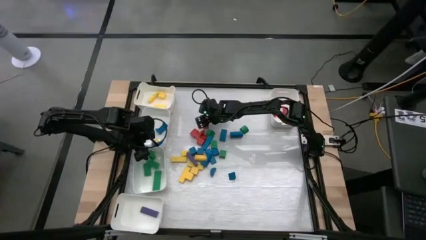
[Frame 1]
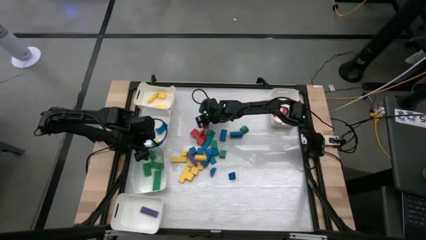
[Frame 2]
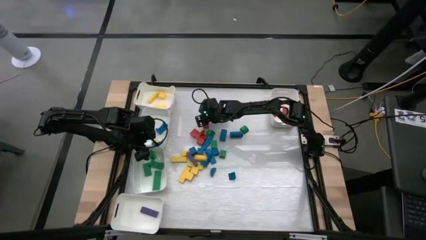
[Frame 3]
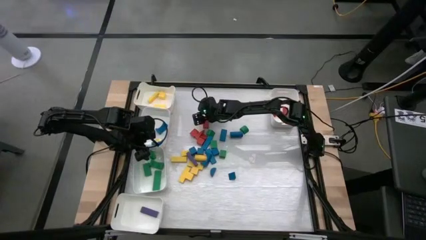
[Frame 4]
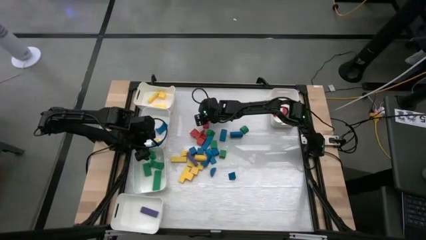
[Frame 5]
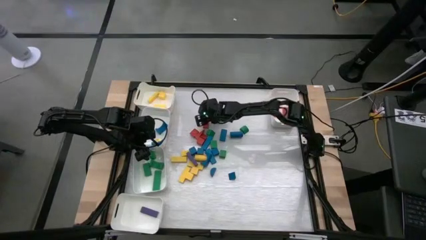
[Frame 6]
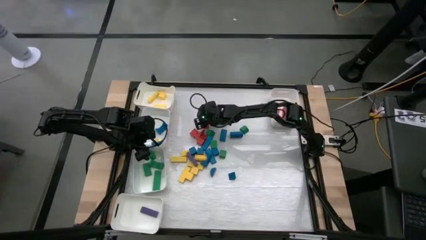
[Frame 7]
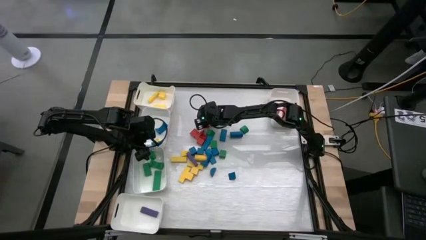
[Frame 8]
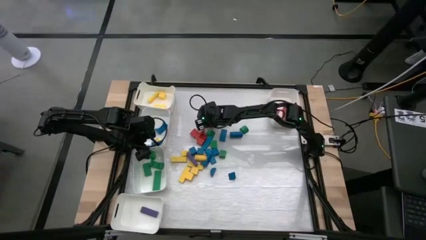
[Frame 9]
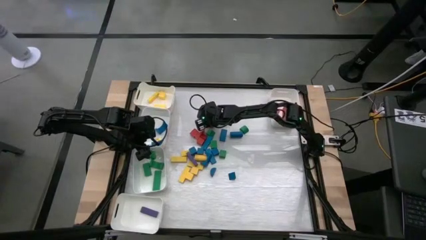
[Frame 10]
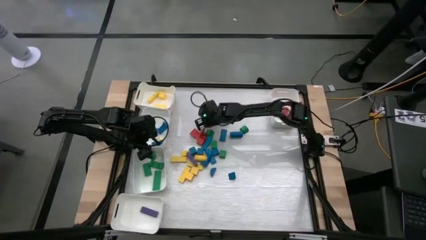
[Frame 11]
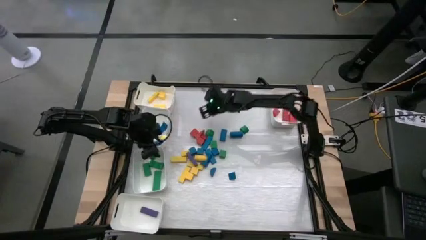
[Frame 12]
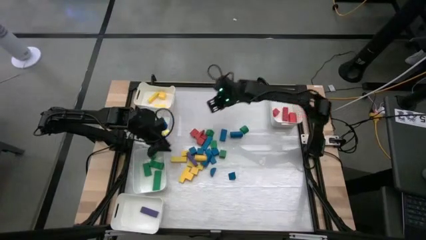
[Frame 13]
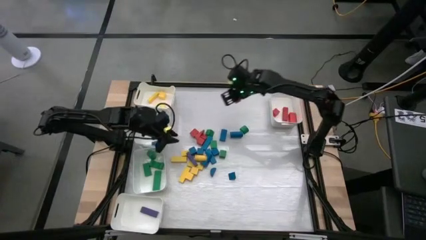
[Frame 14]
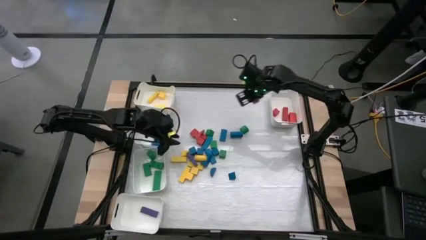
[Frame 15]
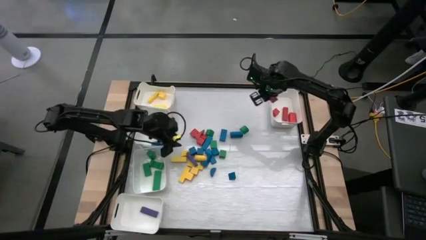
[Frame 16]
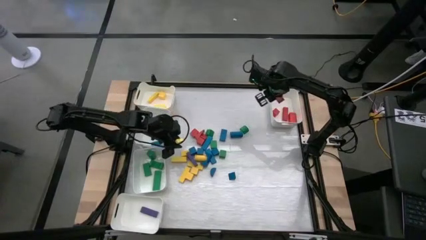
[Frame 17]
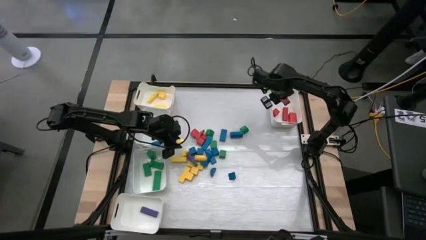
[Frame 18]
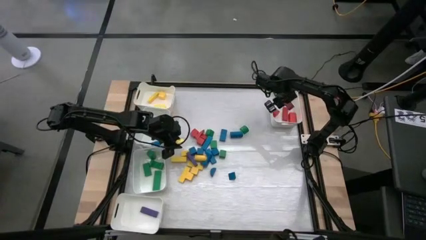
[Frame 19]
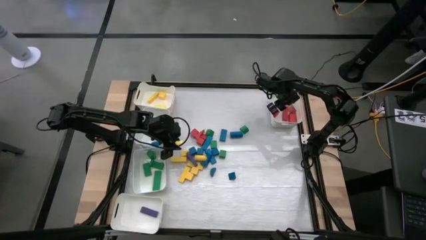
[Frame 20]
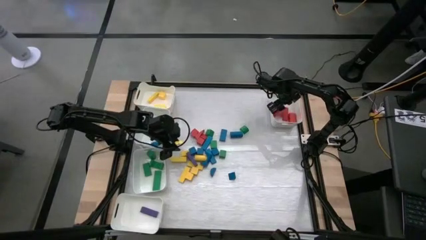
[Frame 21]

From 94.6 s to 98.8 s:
Task: Sort blocks
Put the red wooden block into the top right white bin

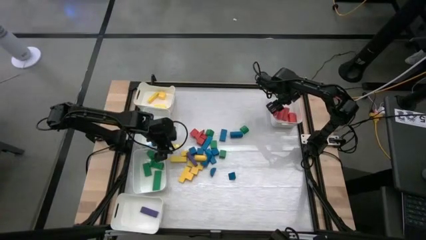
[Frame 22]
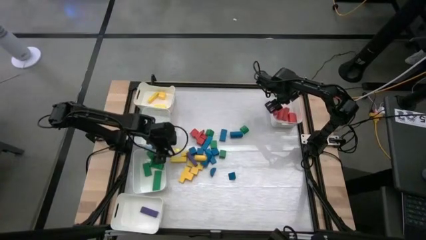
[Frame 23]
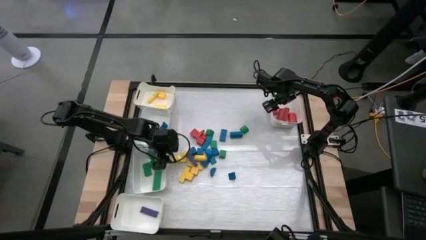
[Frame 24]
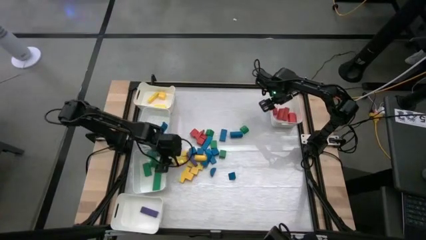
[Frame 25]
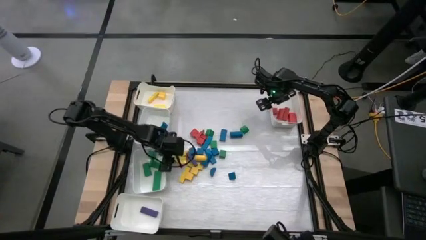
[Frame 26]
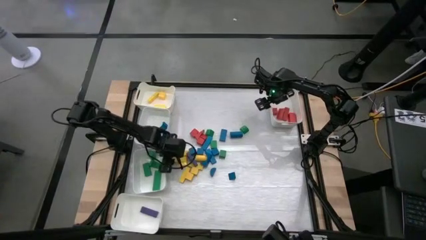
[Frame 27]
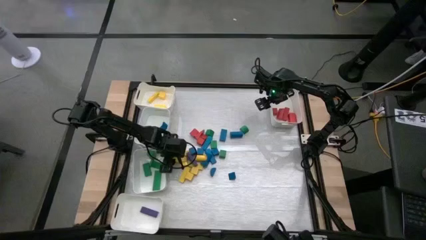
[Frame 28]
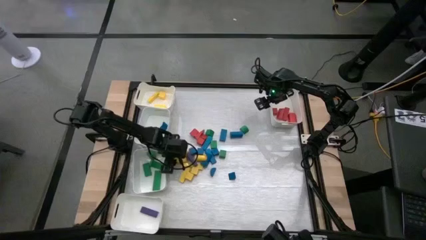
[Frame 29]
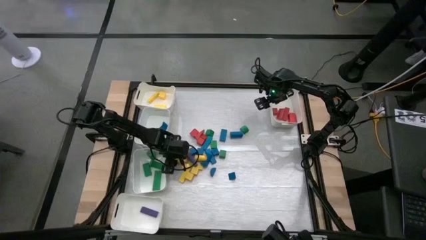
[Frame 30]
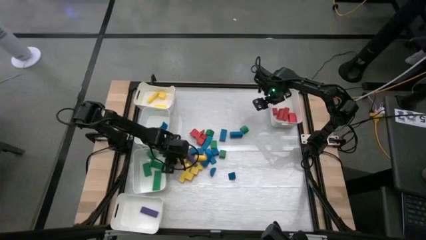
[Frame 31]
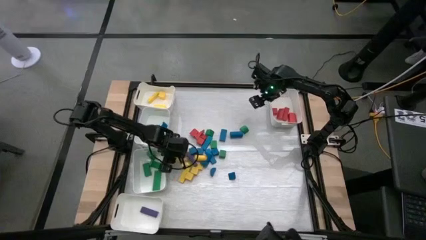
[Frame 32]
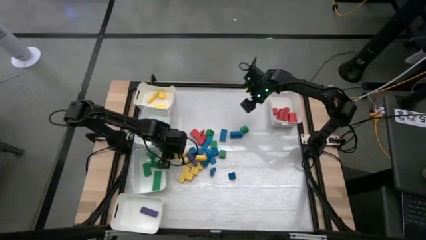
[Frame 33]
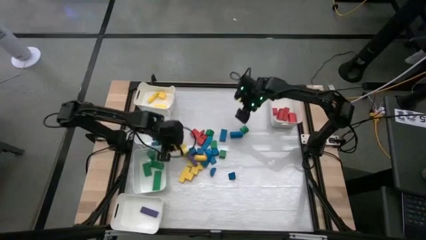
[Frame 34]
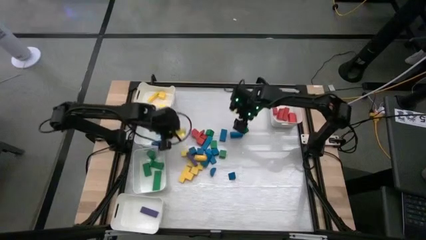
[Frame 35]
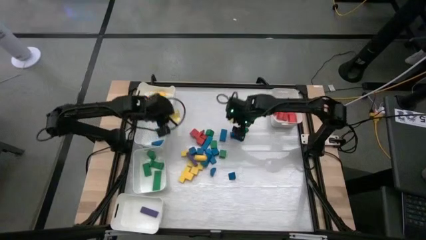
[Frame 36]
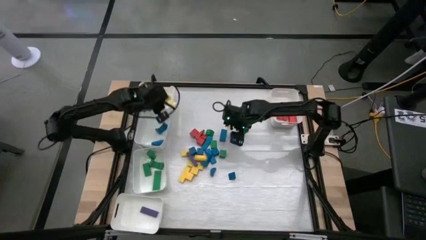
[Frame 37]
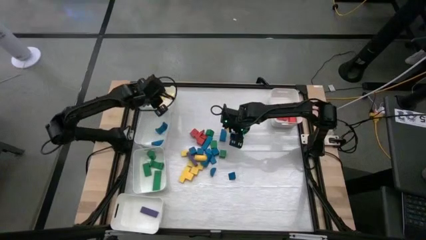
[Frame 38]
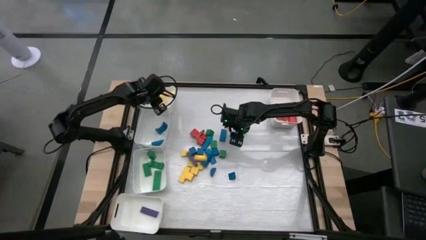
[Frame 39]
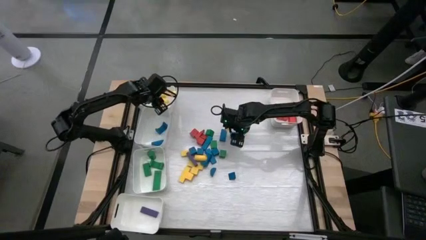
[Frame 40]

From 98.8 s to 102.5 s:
Put the yellow wooden block into the top left white bin

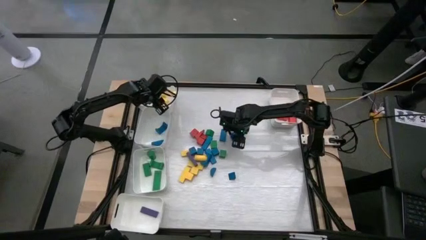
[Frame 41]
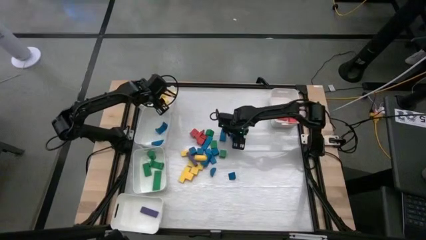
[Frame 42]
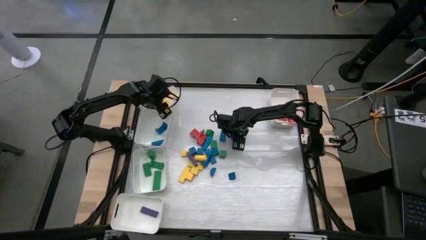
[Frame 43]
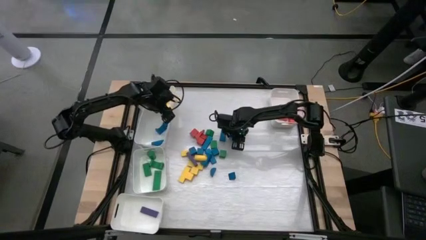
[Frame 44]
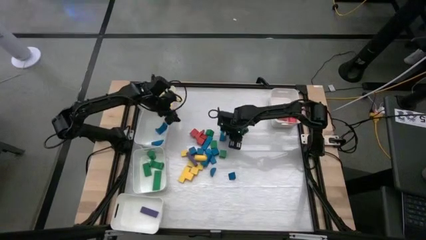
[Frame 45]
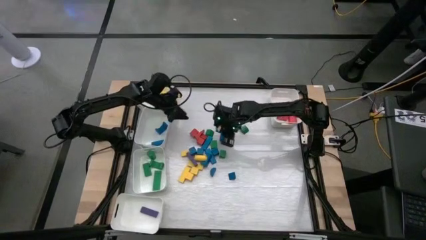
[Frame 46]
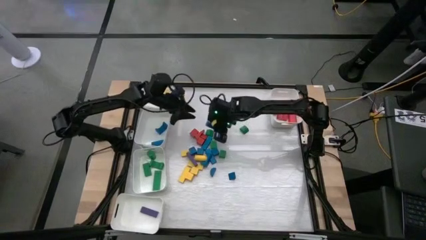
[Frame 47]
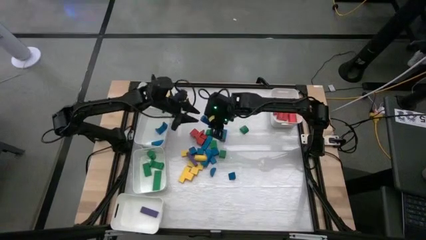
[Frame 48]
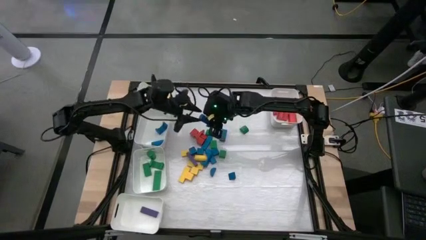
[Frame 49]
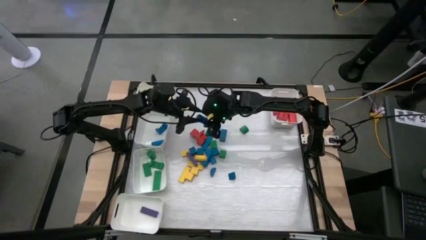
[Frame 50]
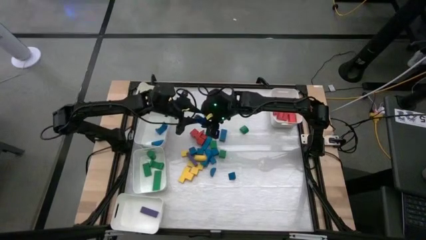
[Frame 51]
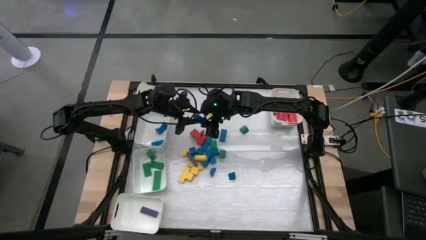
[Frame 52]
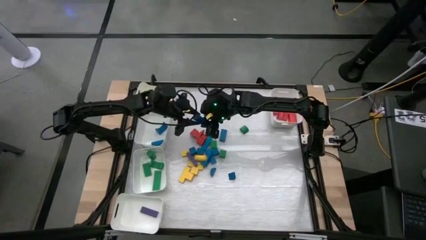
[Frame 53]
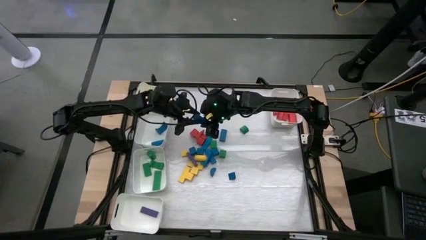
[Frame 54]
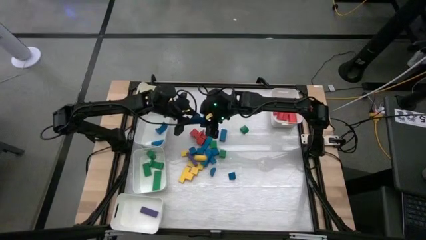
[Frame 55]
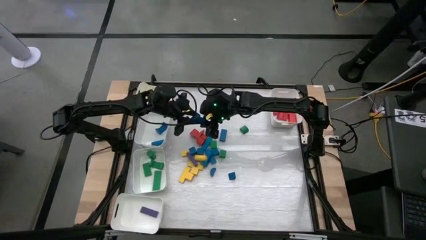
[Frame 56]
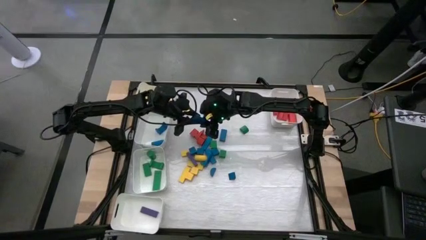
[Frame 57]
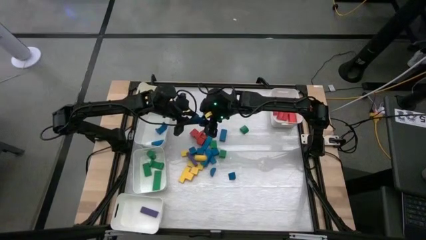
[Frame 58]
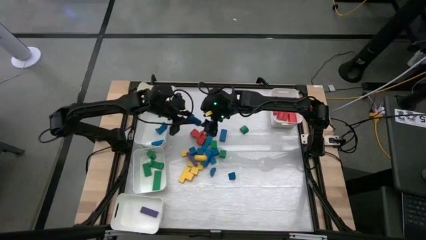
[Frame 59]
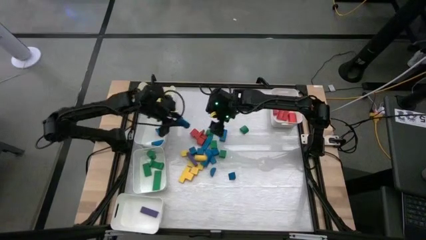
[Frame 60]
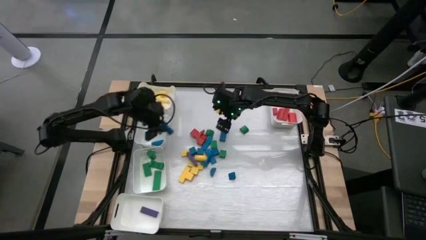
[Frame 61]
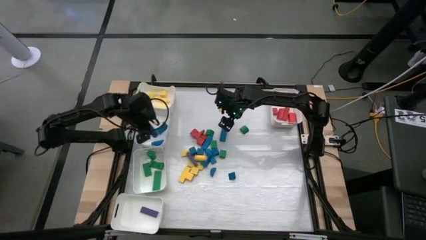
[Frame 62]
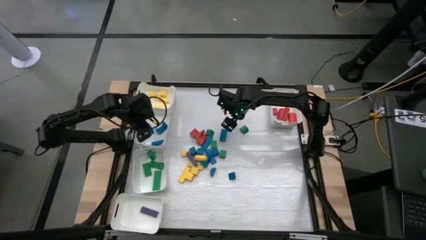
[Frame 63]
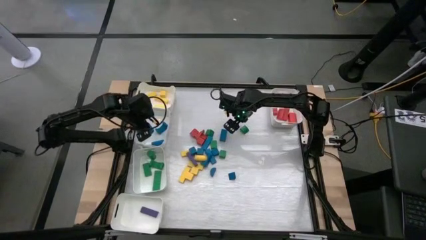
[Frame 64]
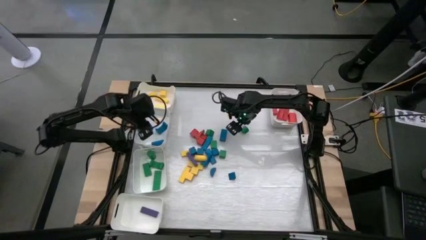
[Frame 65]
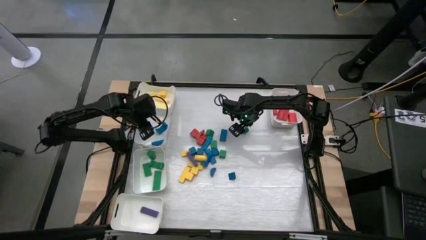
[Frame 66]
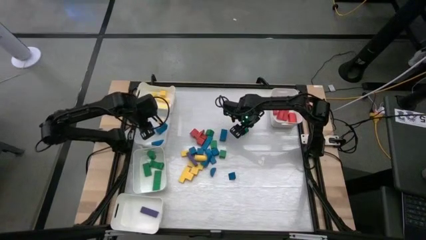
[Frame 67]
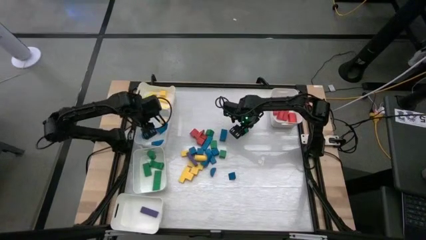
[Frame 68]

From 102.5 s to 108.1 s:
Put the blue wooden block into the top middle left white bin

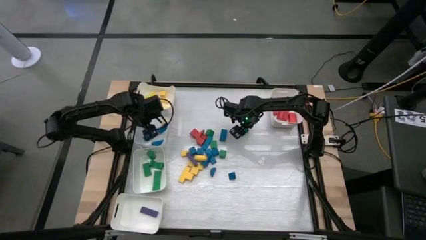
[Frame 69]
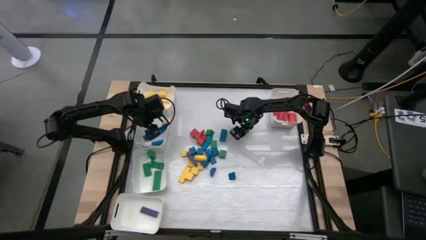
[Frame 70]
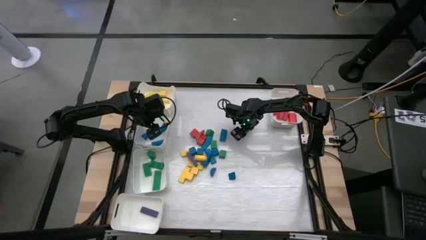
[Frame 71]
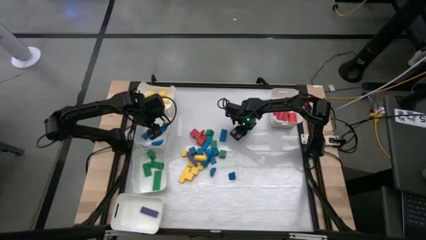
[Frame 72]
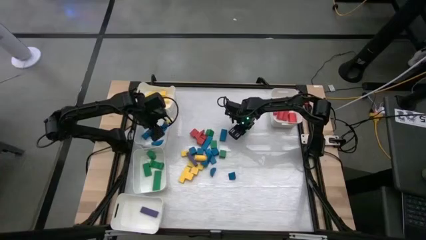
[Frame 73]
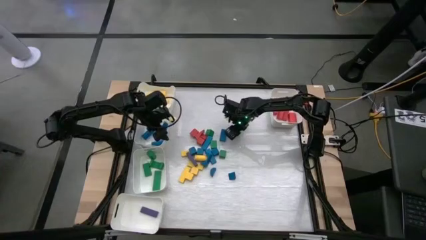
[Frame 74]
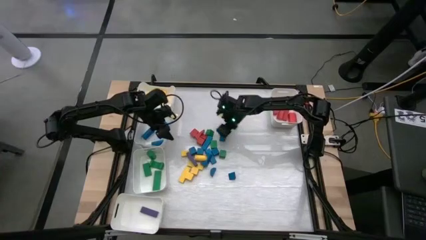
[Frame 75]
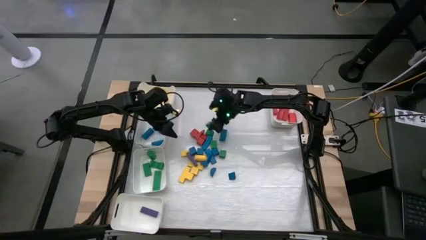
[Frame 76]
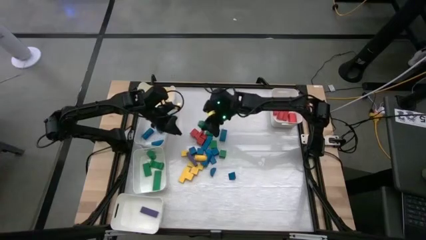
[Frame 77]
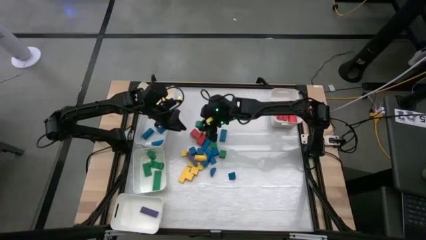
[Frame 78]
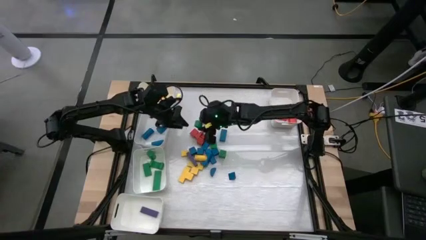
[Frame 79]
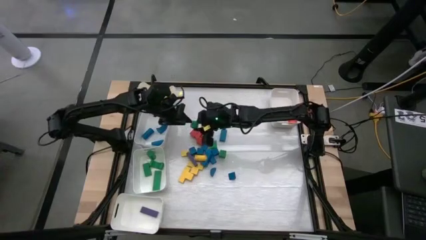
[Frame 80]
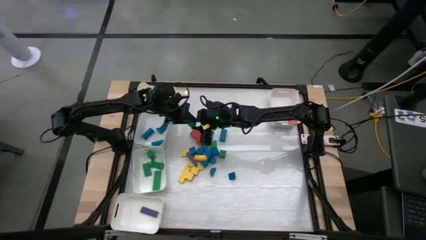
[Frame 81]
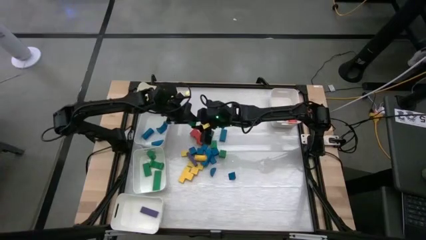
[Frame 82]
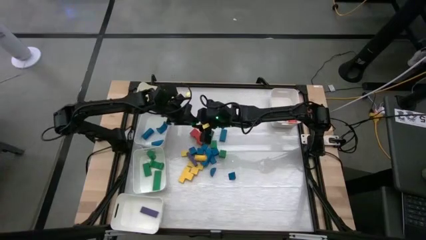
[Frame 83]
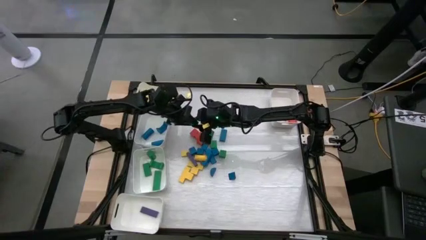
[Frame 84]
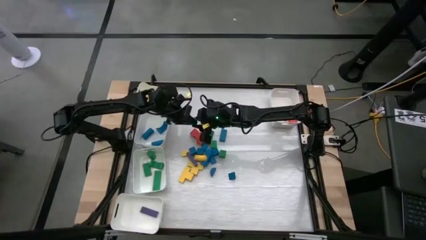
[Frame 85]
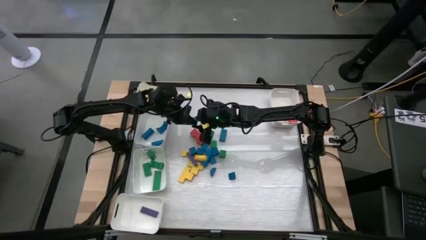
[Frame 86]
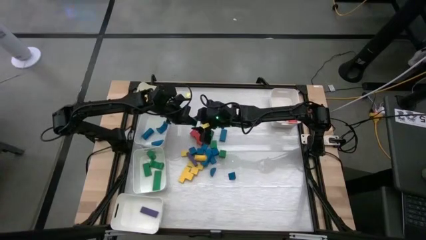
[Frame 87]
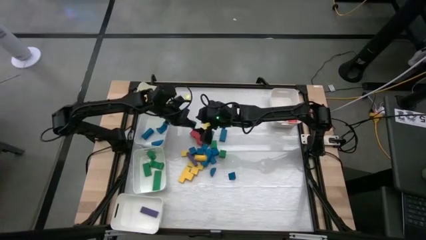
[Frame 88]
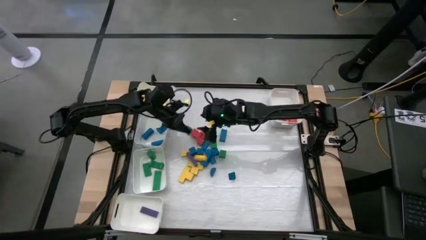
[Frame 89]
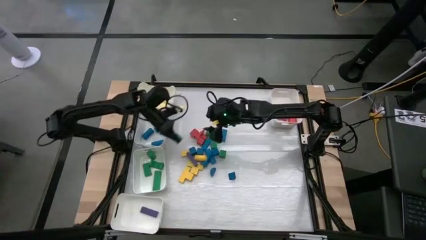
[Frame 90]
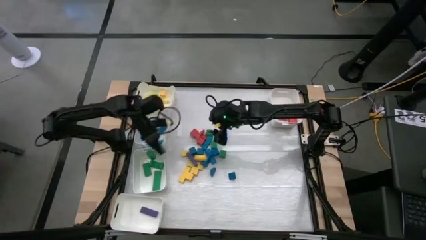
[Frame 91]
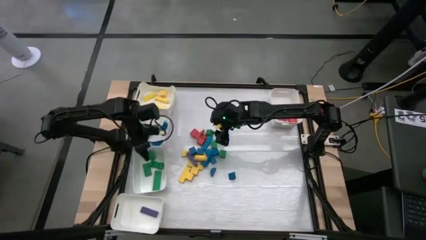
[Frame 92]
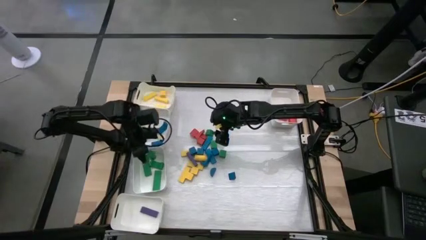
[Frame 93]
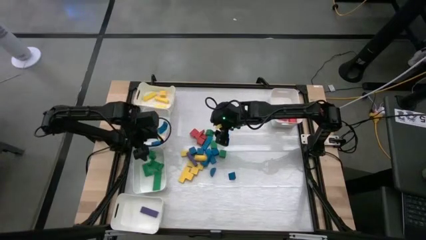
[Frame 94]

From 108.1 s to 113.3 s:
Put the green wooden block into the bottom middle left white bin
